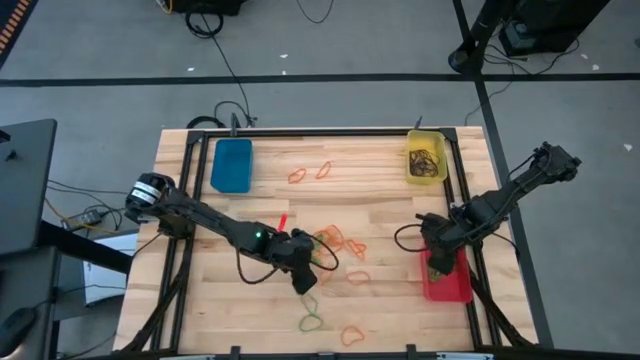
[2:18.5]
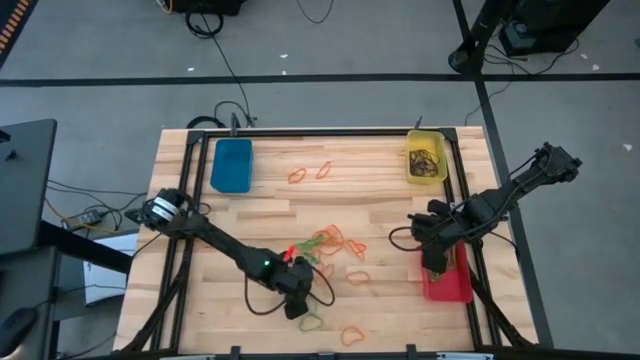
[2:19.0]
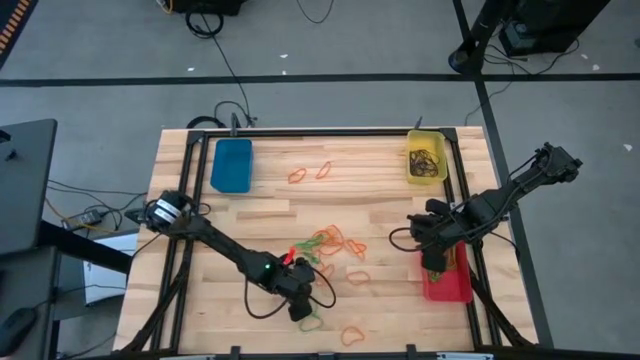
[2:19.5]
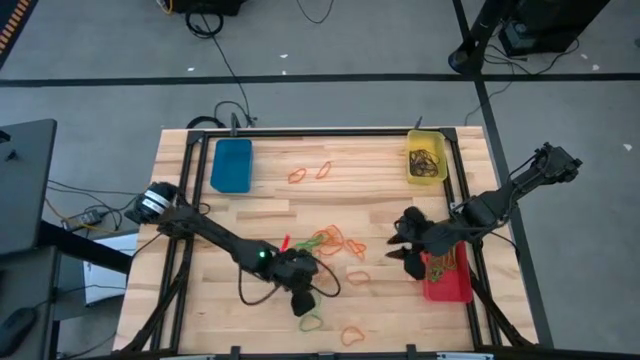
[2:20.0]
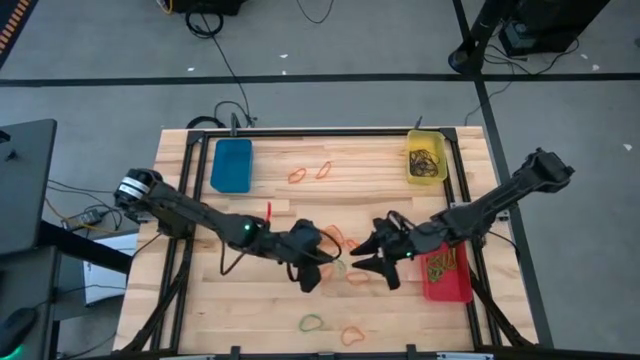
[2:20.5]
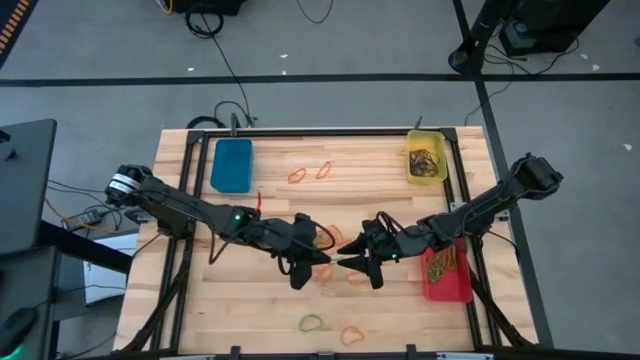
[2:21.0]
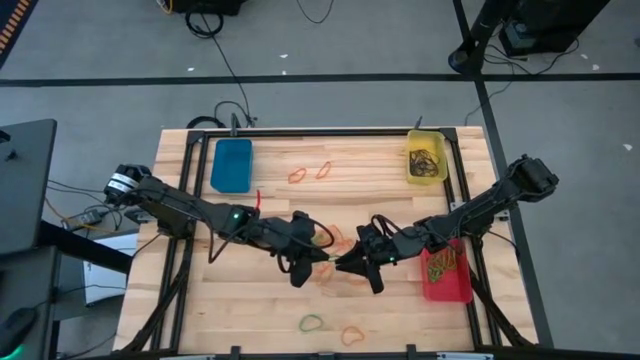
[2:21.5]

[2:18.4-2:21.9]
Task: Sort rubber bands into baskets
Put the green rubber band into the red bin

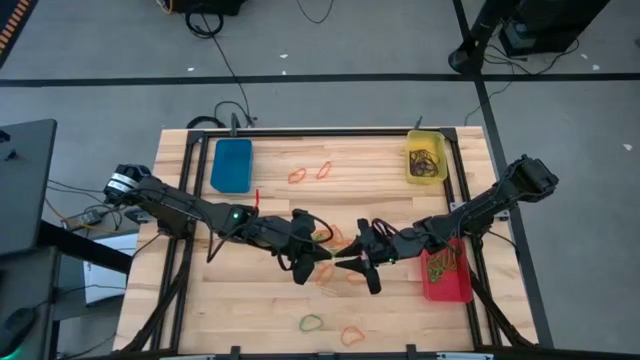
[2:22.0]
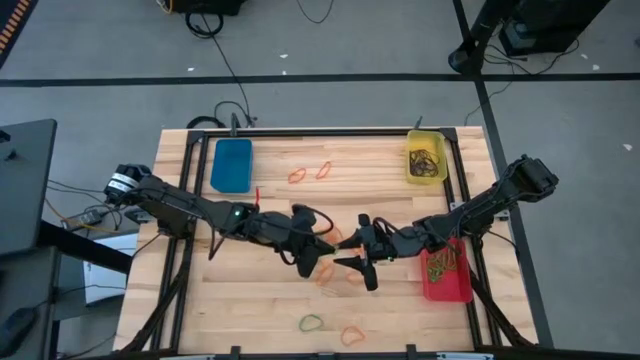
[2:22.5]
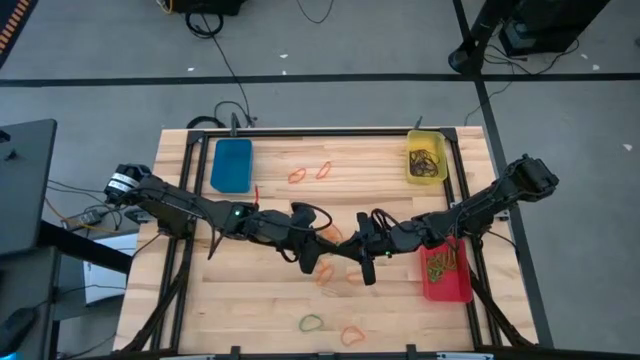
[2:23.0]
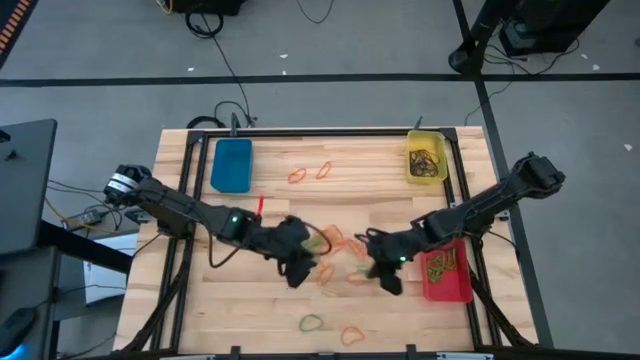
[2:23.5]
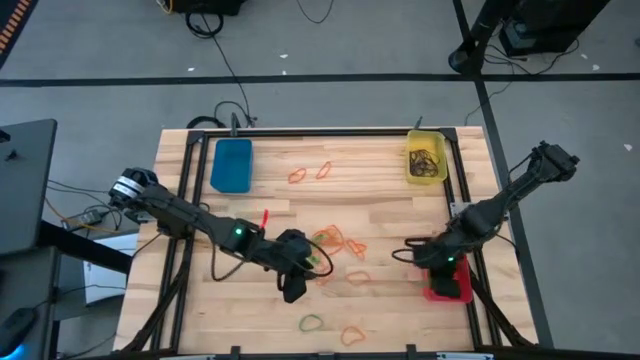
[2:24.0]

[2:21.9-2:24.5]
Put the green rubber band into the red bin

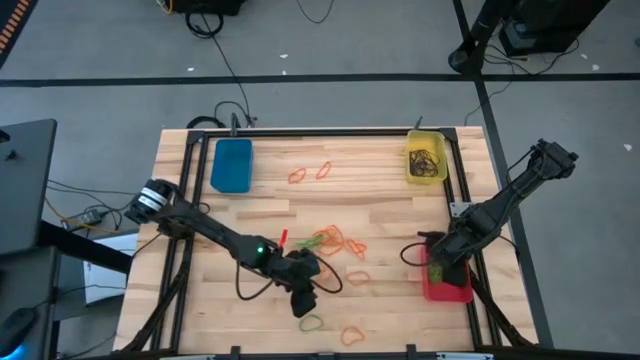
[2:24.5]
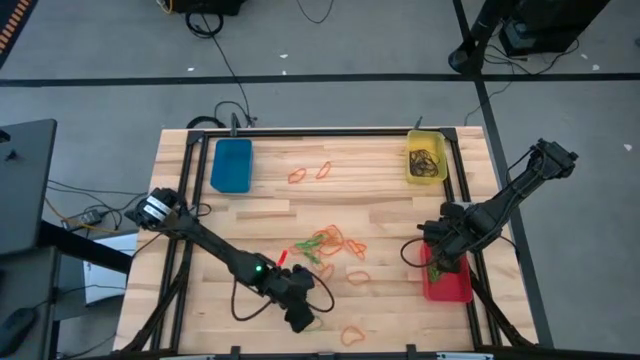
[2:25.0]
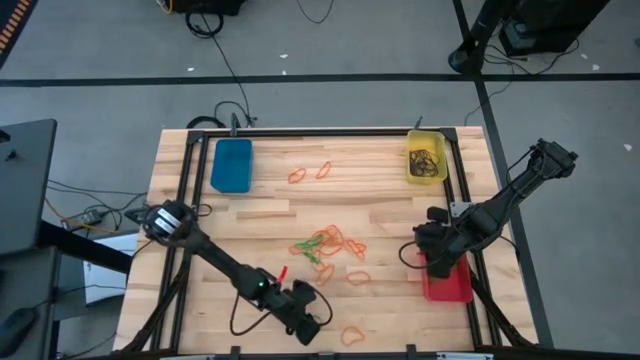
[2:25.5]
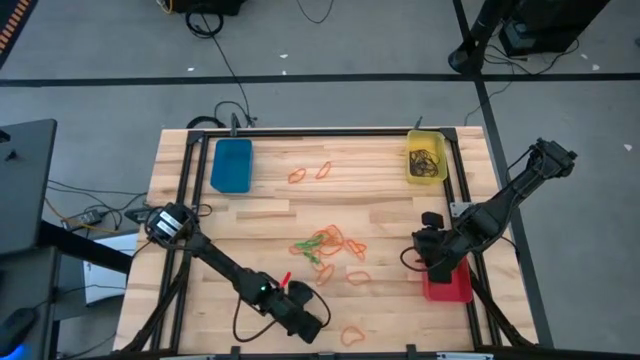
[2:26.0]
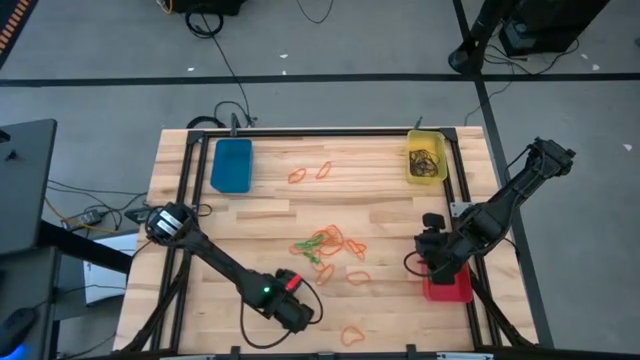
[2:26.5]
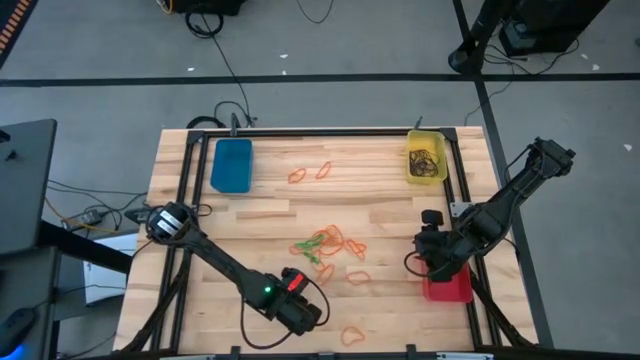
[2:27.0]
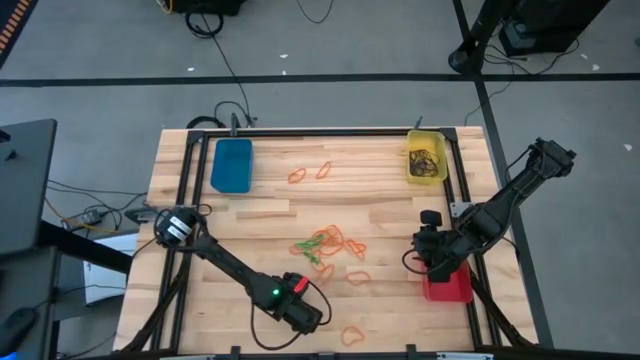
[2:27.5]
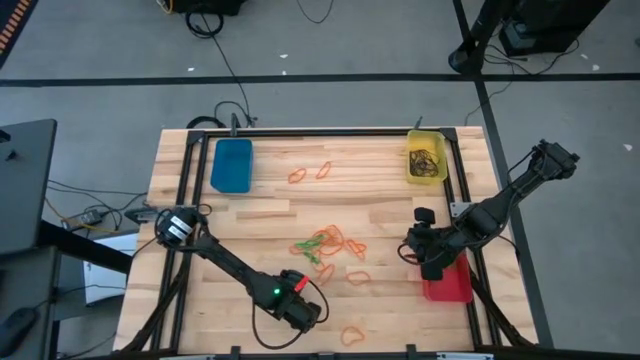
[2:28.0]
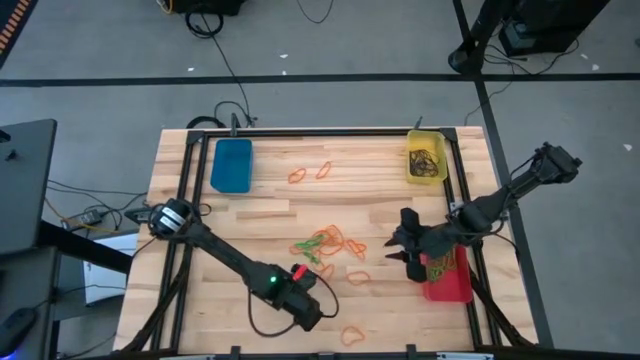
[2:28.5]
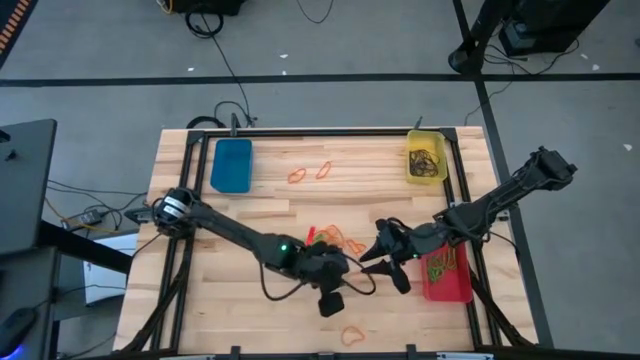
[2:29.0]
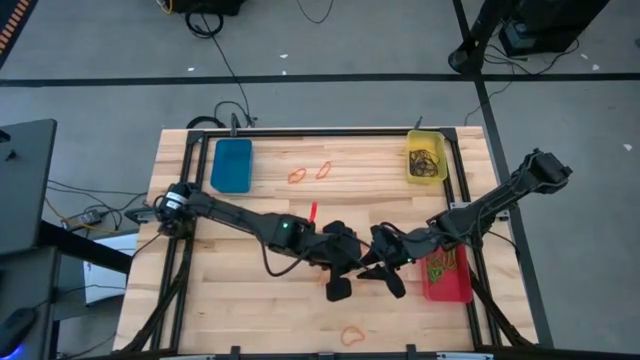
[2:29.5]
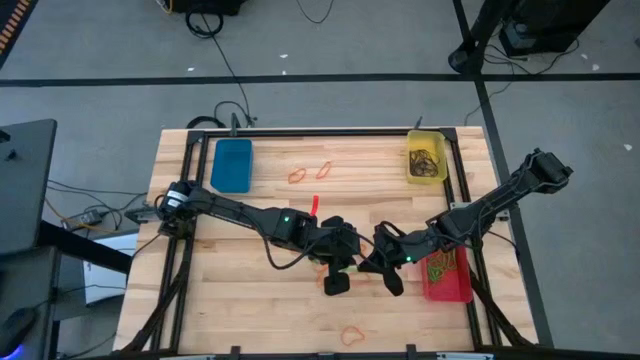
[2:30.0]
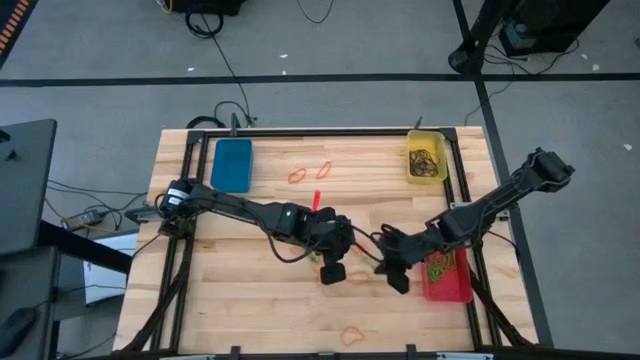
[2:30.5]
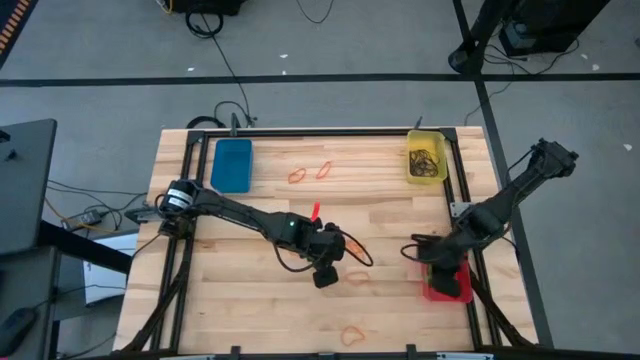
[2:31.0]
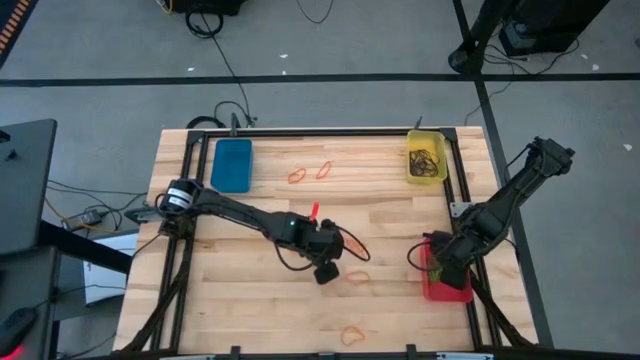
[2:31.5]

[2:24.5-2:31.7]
Put the green rubber band into the red bin

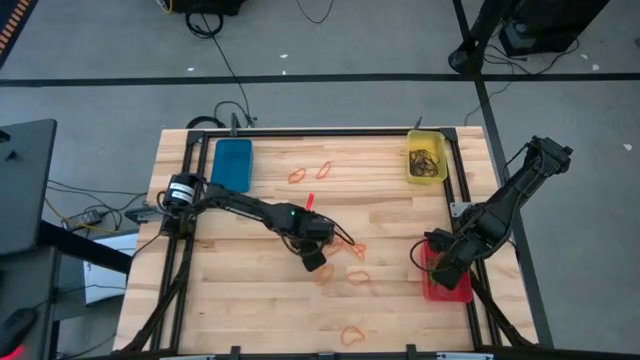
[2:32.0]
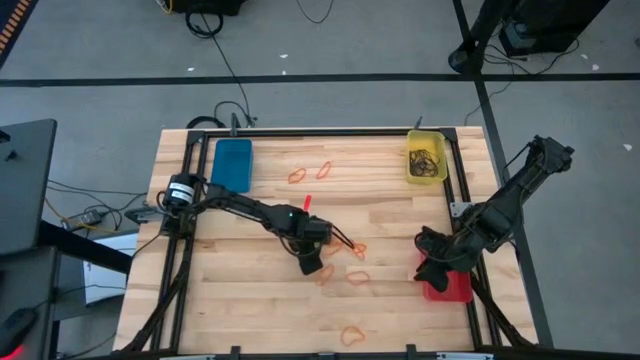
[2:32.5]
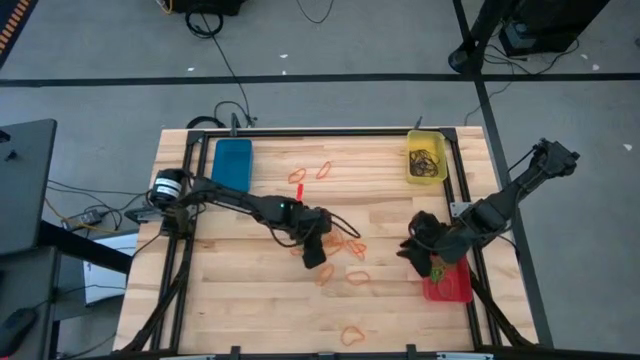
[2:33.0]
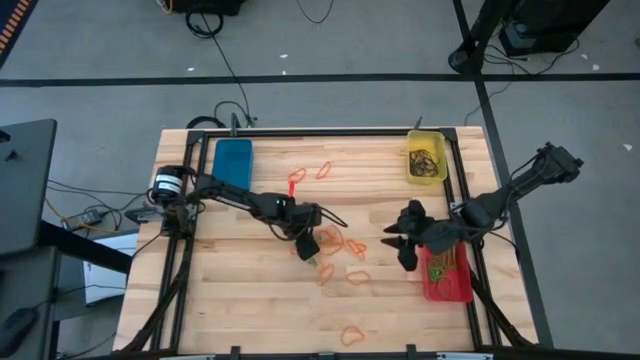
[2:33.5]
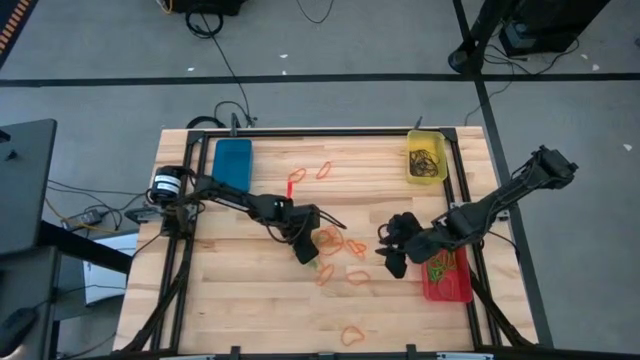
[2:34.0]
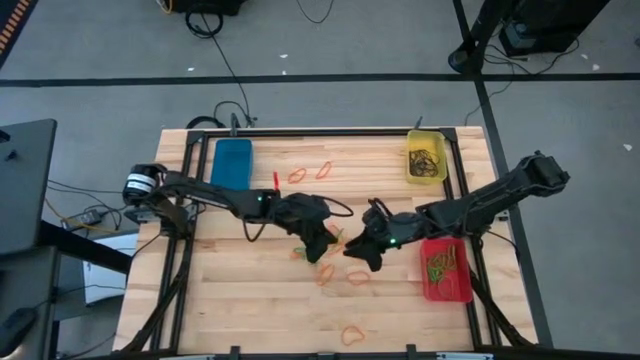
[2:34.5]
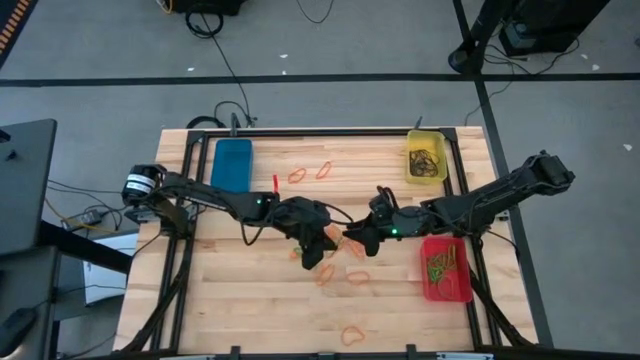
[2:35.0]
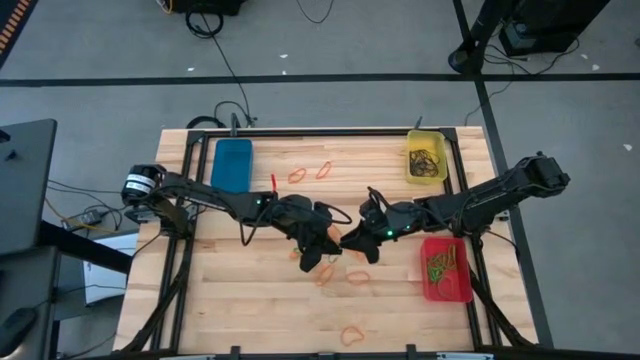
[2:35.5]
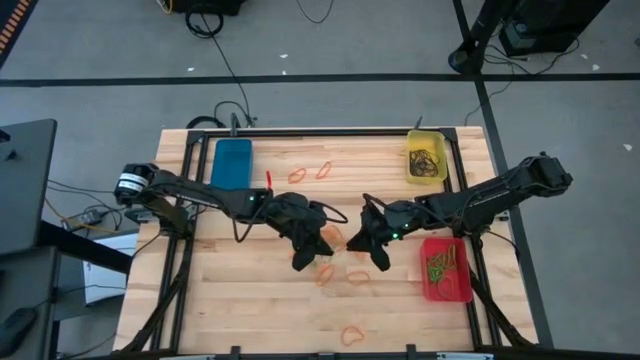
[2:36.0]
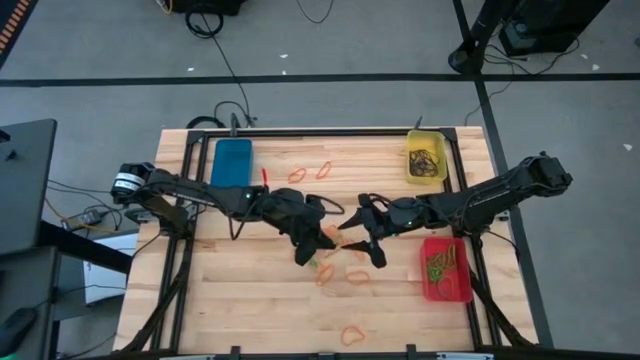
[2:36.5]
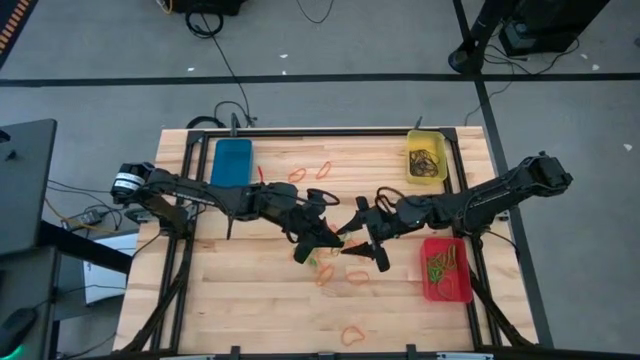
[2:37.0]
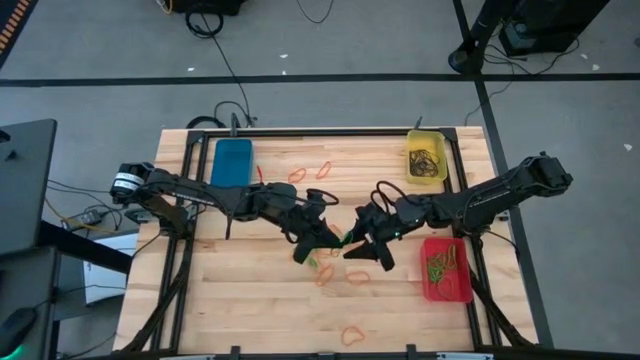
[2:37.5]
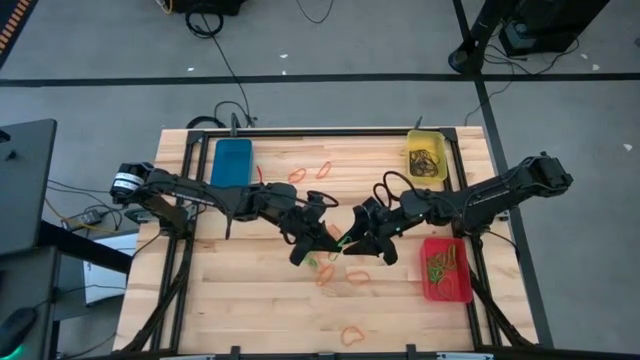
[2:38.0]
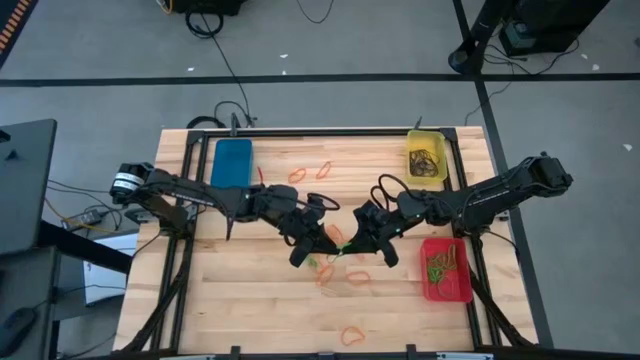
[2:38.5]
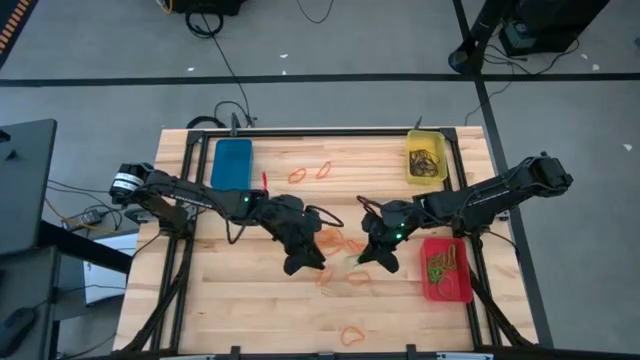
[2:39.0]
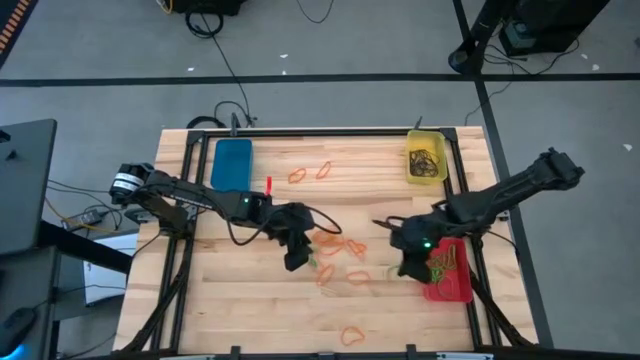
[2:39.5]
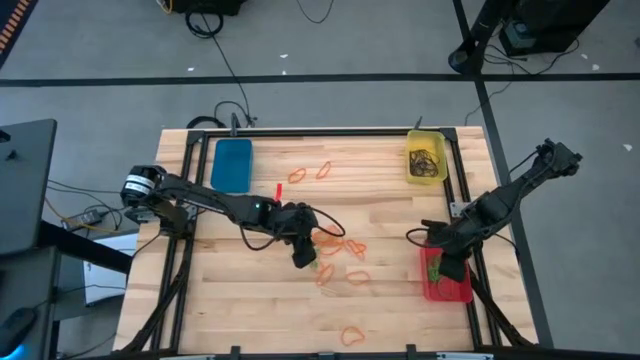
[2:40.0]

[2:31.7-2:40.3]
Put the green rubber band into the red bin
